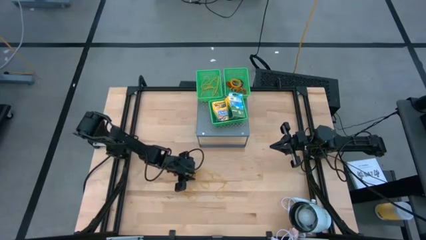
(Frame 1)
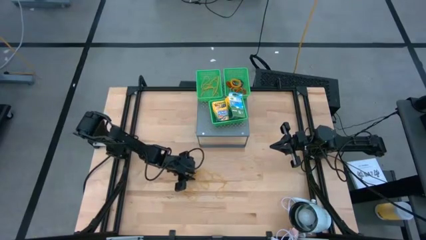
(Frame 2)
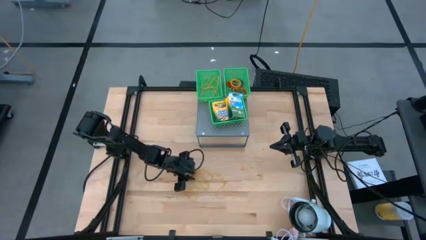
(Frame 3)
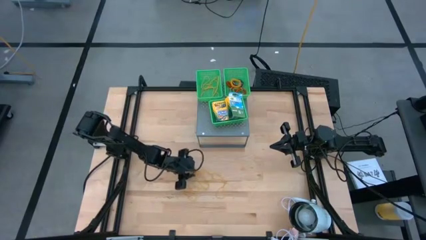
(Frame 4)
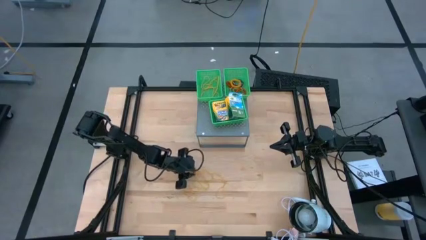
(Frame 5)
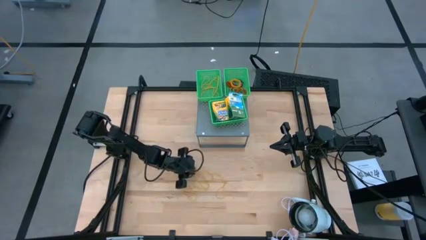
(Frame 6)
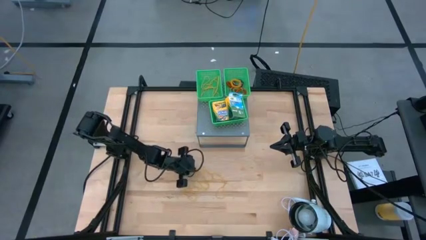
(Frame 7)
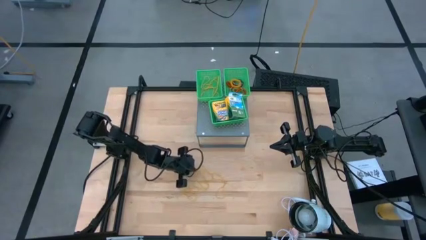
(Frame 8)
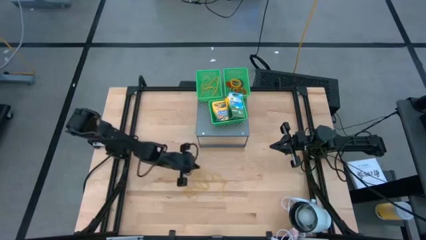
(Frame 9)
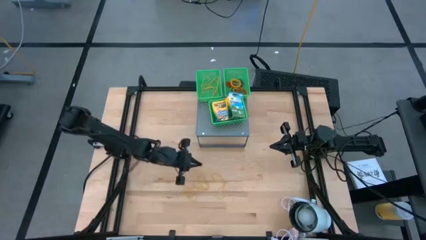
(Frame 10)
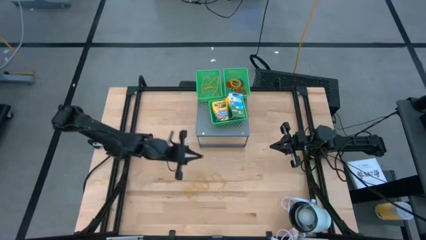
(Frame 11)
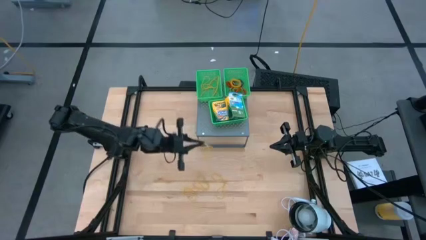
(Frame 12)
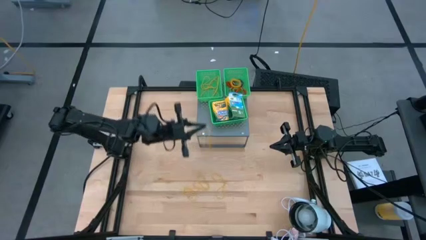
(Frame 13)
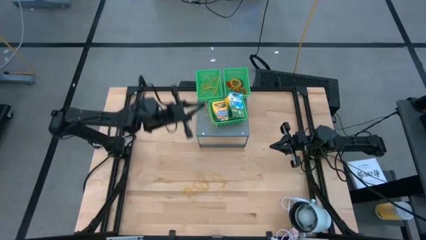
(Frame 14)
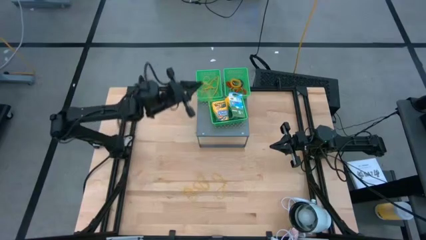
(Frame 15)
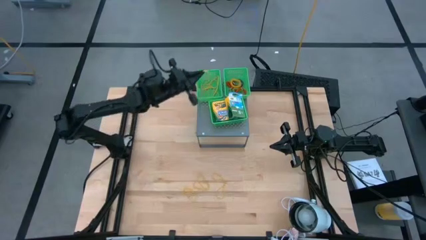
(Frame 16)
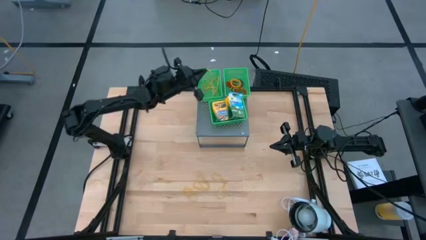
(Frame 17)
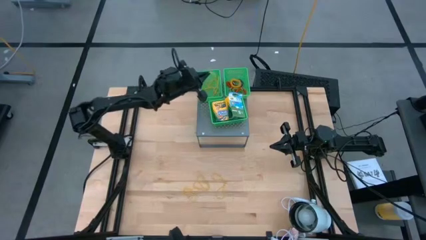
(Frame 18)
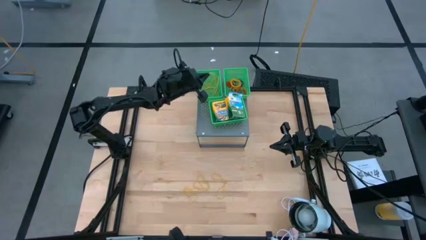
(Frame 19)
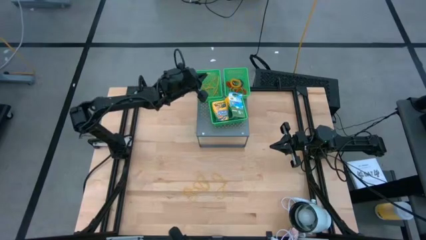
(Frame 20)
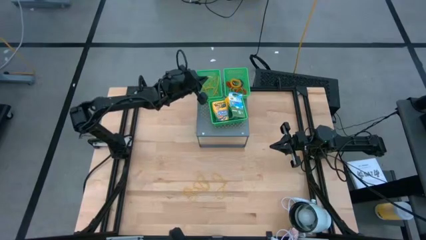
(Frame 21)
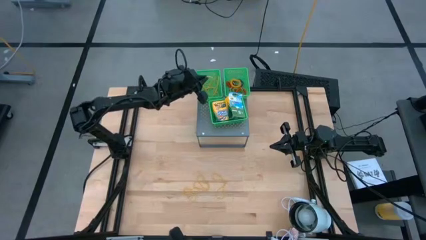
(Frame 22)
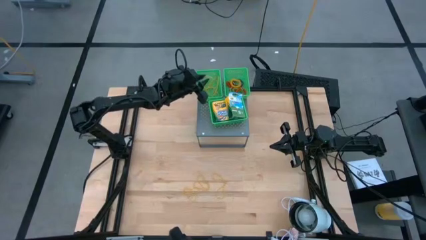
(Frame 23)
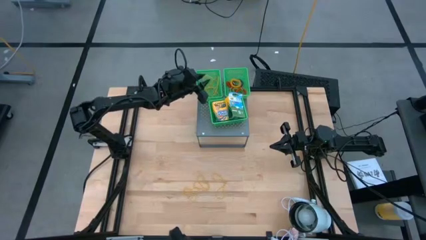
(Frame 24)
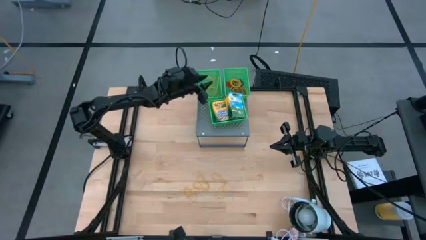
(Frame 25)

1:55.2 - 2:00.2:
Task: Pick & Place Office Desk Supplies
Put the yellow rubber band into the left green bin on the shelf

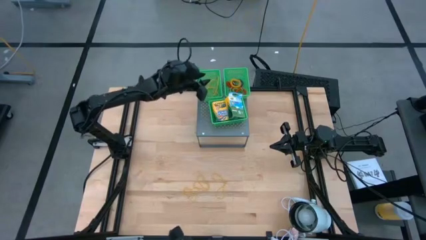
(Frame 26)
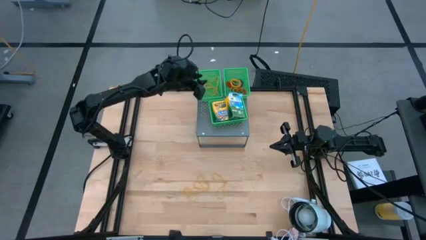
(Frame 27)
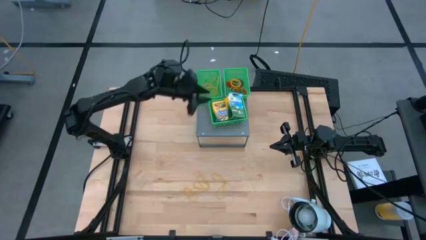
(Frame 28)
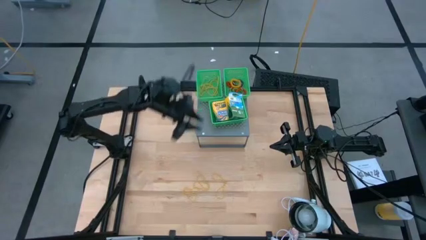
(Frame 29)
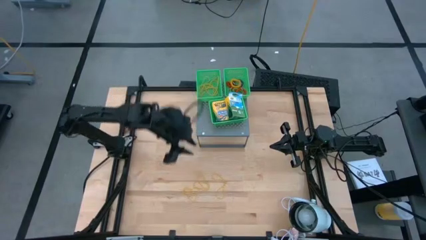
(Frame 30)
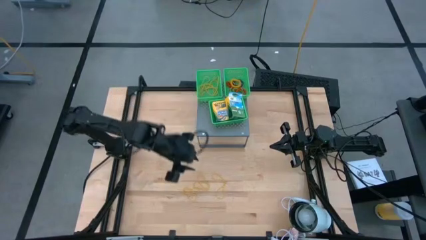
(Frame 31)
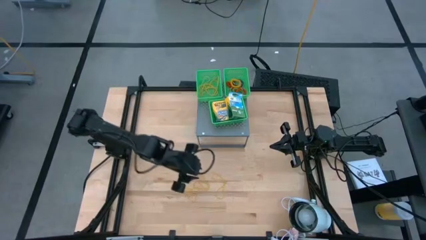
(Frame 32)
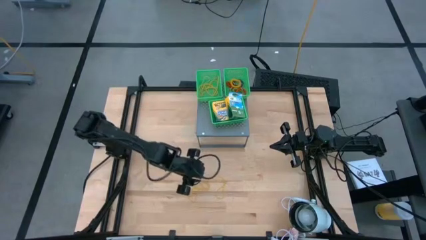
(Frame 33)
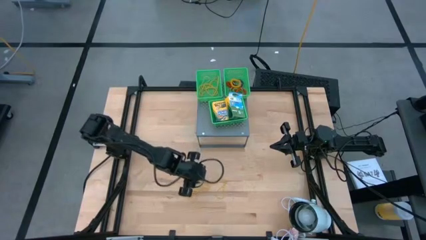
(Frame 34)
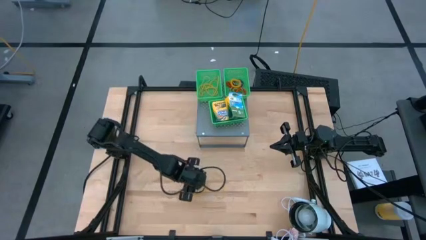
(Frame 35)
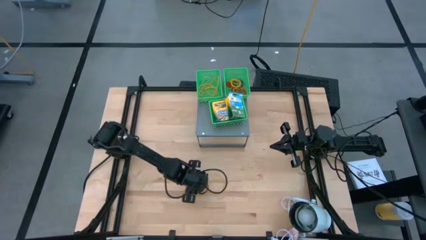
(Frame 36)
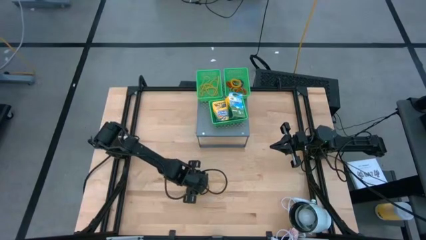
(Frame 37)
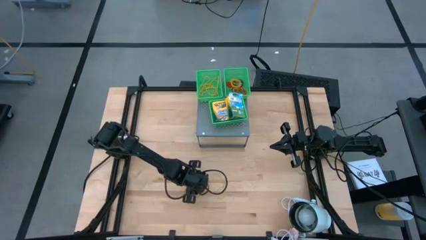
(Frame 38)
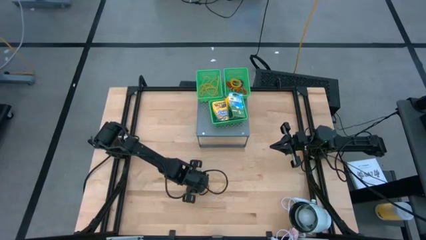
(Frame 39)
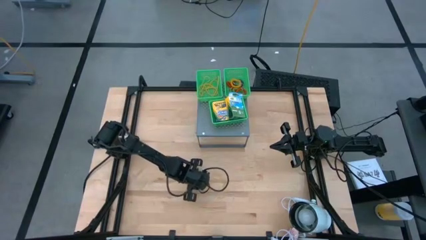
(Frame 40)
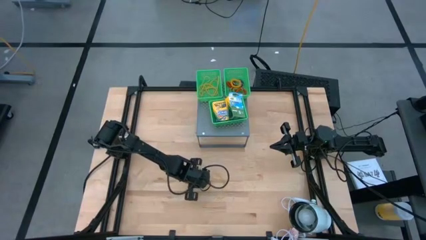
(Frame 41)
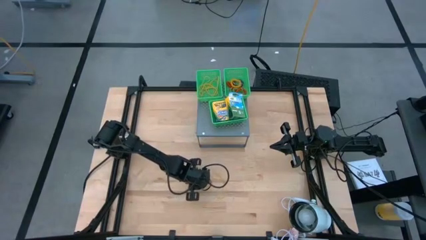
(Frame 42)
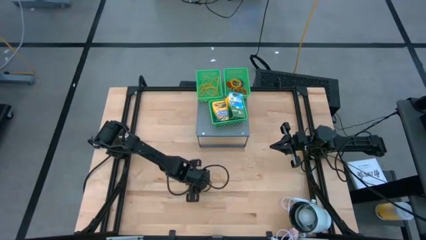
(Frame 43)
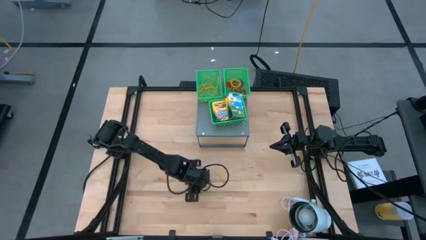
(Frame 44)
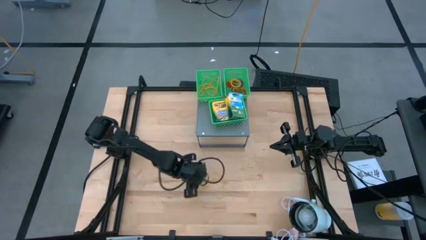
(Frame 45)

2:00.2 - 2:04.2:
Put the yellow rubber band into the left green bin on the shelf

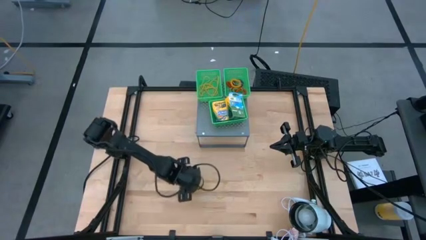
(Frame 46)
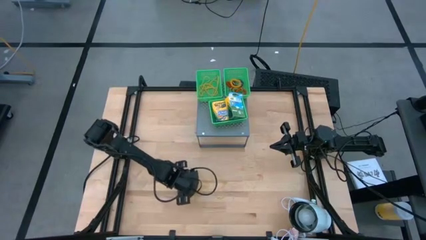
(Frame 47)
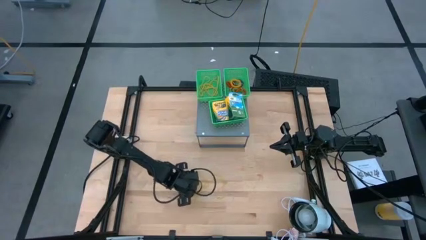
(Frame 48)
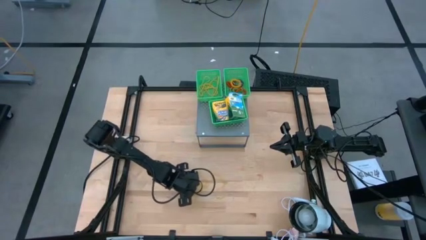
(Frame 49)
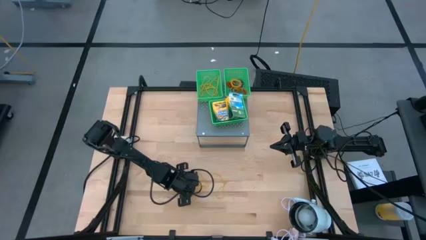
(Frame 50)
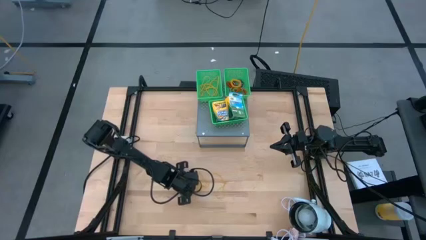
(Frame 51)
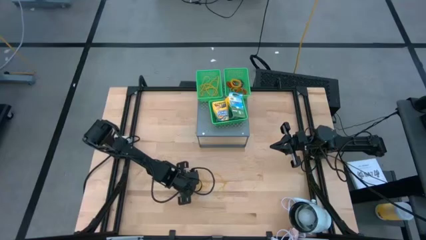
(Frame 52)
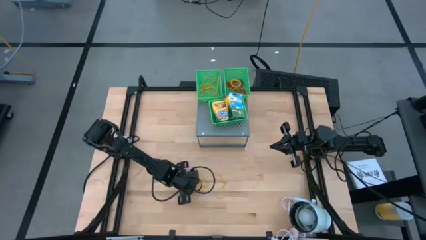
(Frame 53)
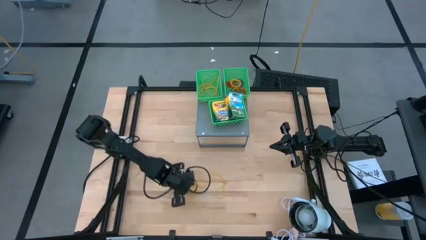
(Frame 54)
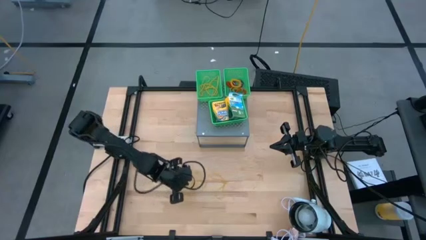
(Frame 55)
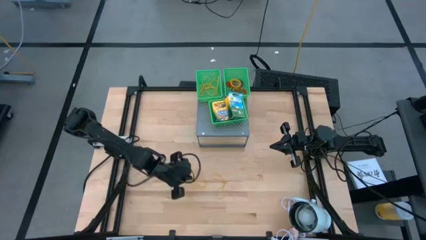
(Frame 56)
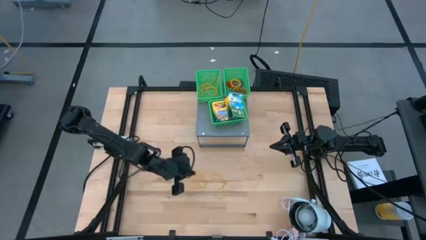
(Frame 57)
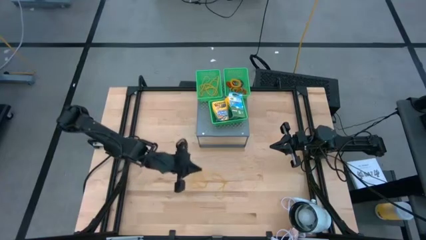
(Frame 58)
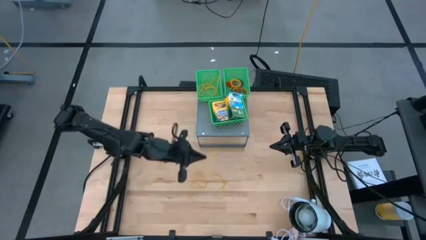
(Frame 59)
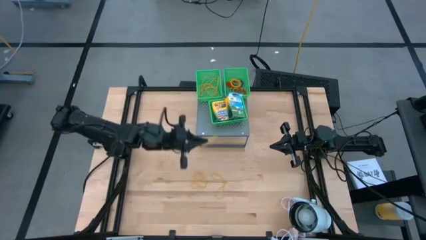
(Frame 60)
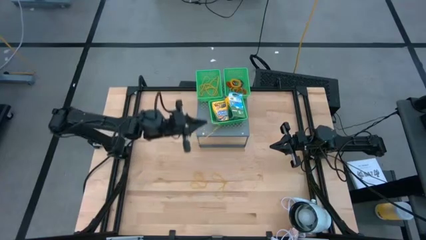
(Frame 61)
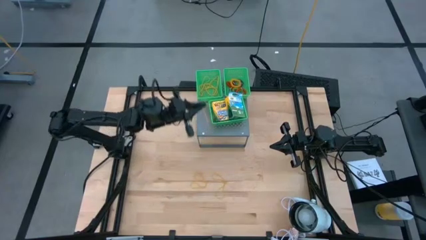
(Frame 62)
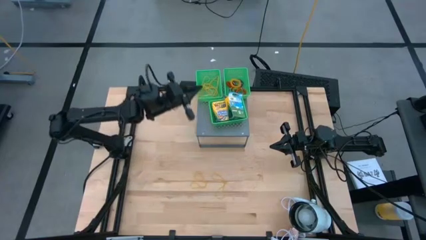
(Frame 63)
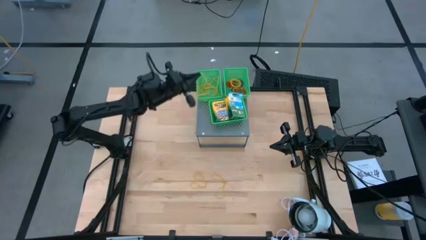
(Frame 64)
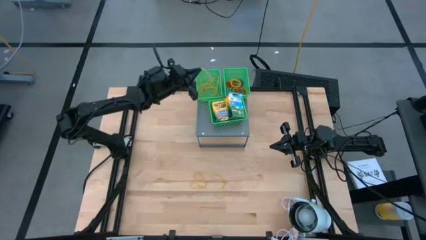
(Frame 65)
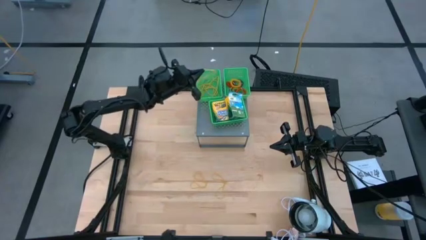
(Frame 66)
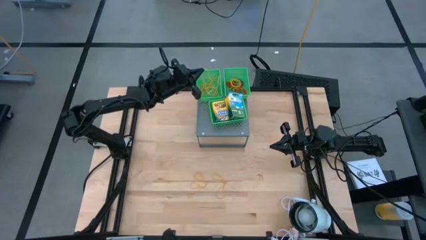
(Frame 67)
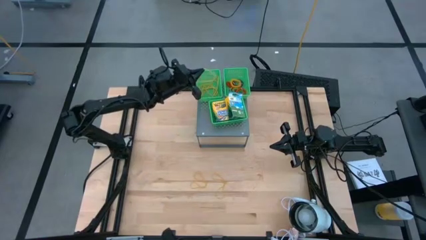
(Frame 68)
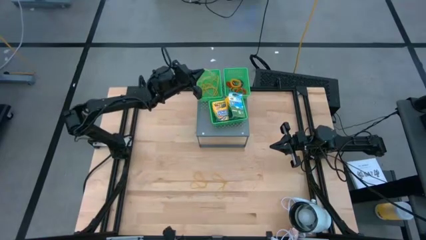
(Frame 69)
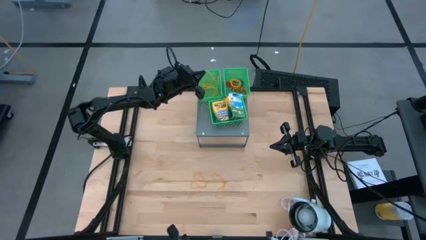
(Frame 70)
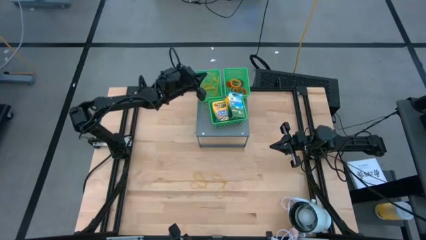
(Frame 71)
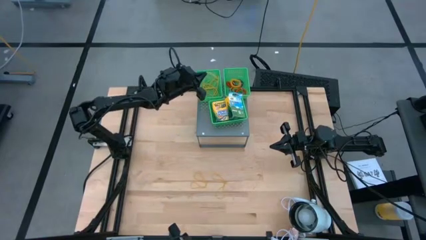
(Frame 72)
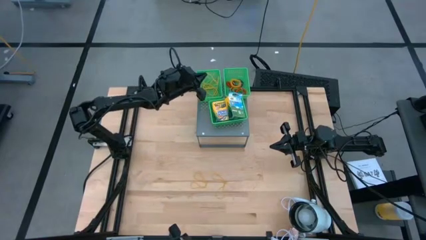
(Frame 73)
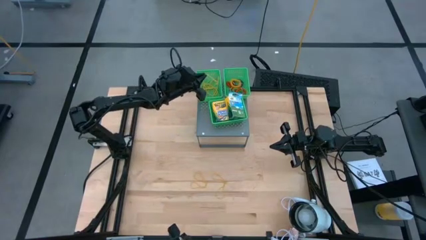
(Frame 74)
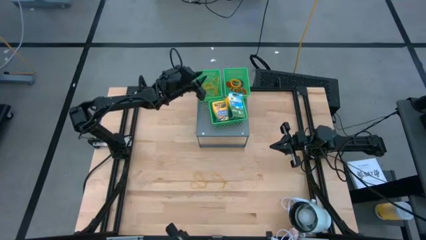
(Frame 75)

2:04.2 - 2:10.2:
Put the yellow rubber band into the left green bin on the shelf
